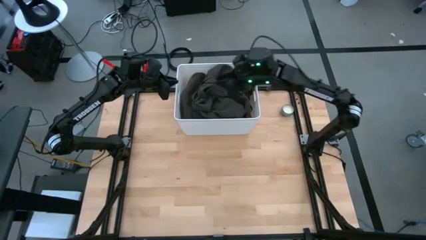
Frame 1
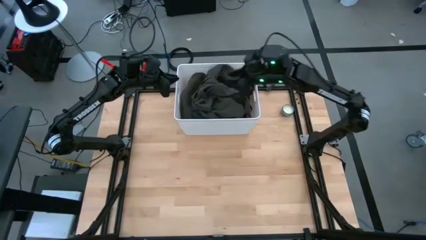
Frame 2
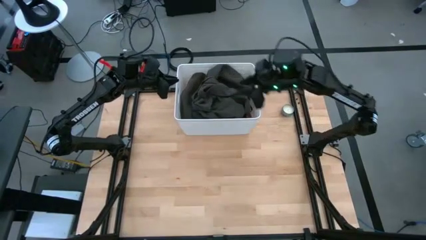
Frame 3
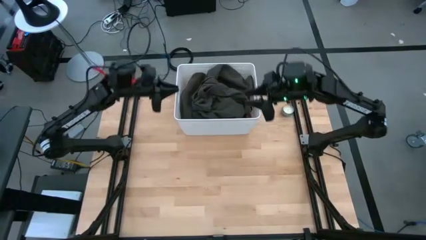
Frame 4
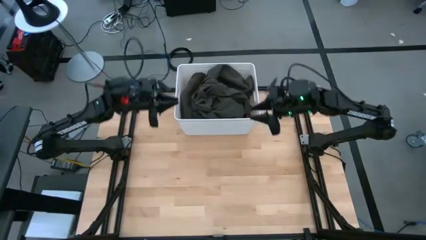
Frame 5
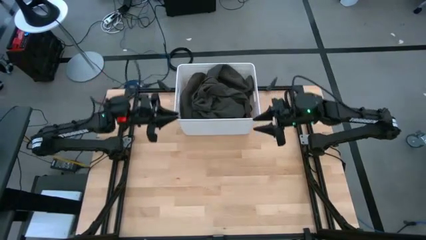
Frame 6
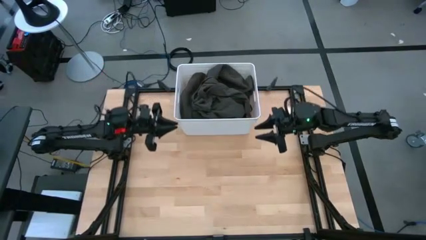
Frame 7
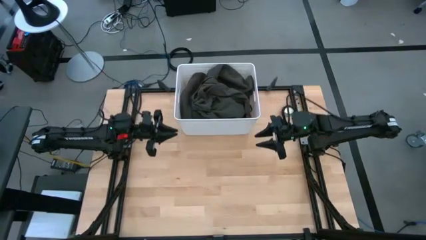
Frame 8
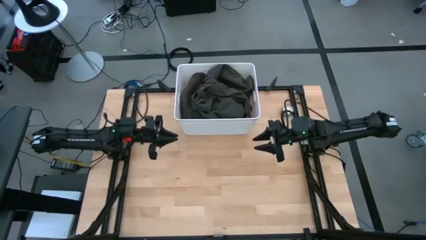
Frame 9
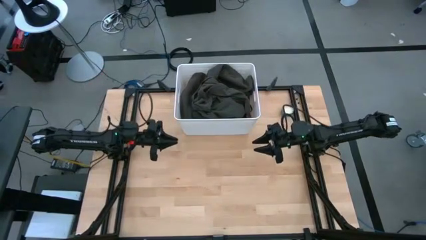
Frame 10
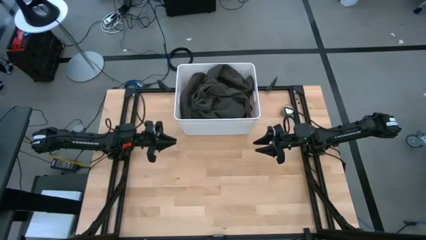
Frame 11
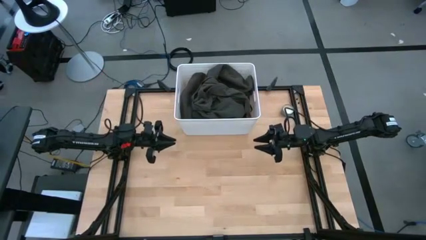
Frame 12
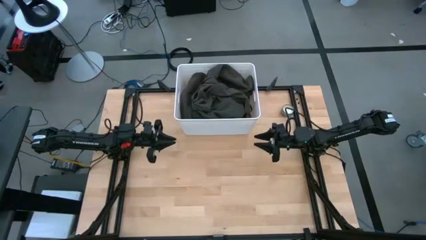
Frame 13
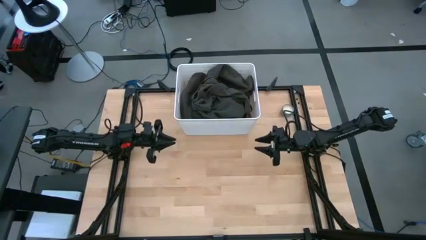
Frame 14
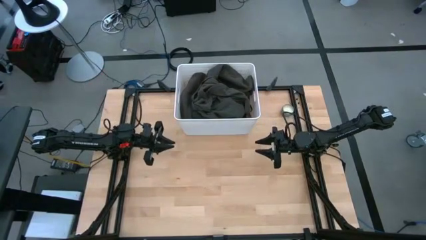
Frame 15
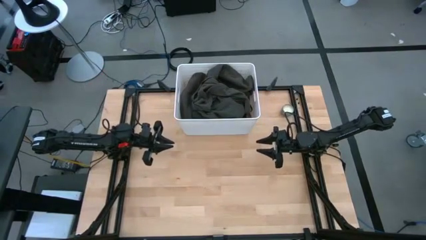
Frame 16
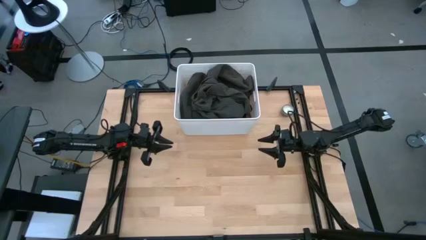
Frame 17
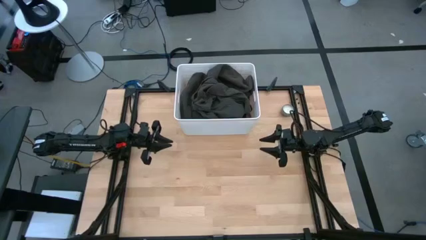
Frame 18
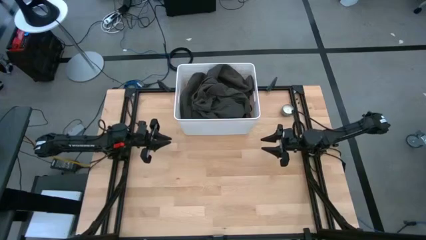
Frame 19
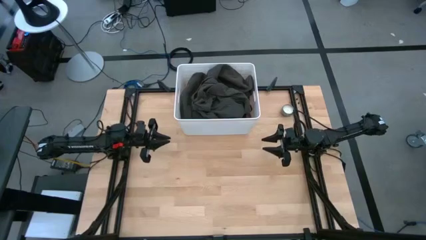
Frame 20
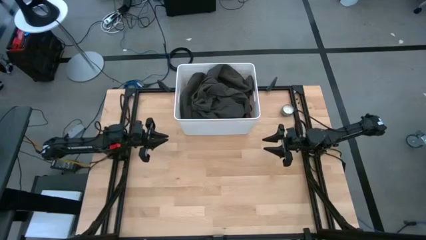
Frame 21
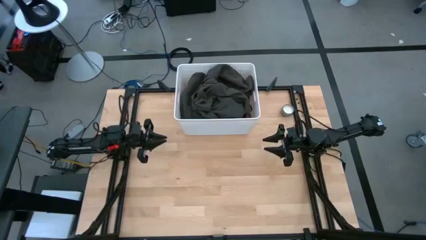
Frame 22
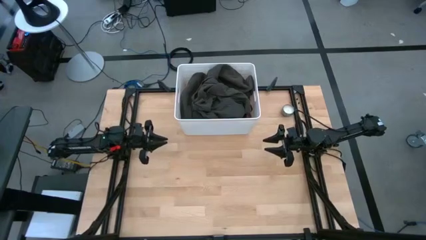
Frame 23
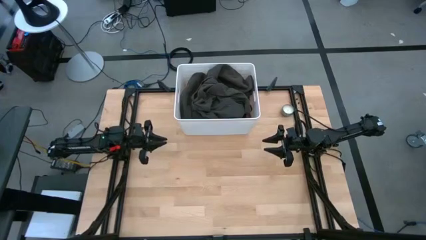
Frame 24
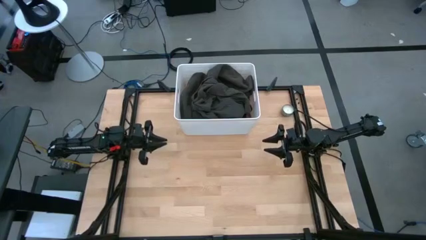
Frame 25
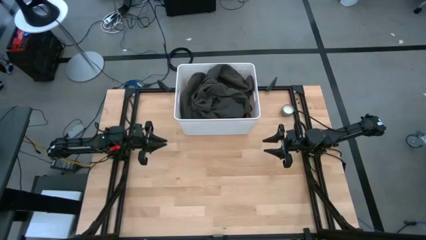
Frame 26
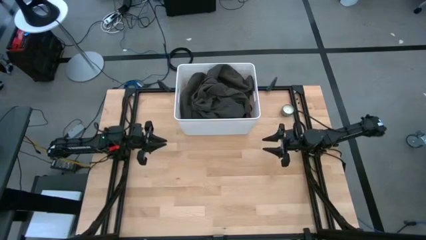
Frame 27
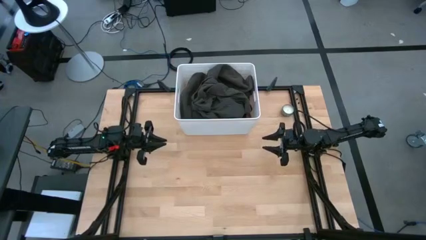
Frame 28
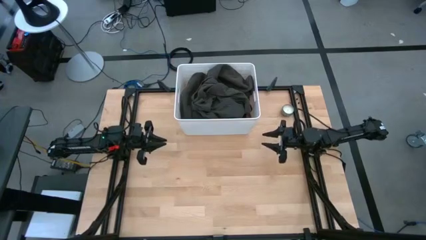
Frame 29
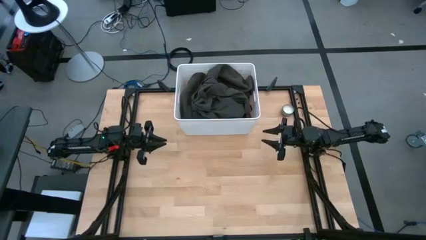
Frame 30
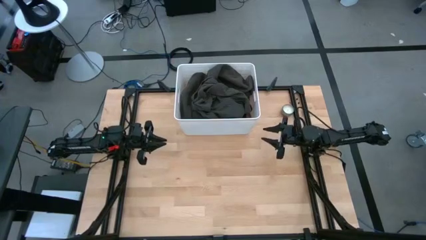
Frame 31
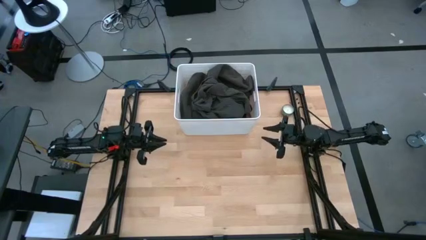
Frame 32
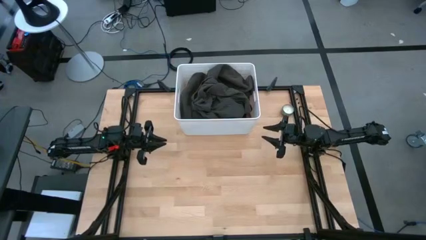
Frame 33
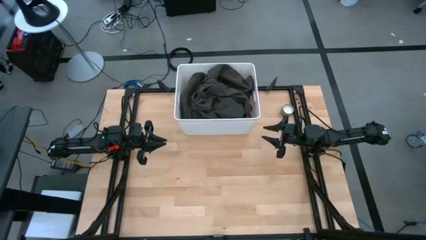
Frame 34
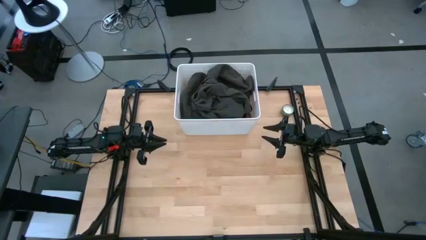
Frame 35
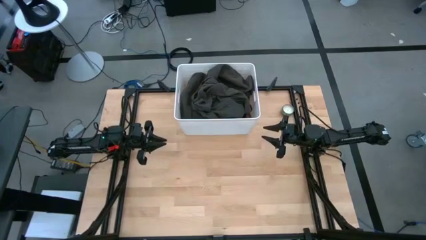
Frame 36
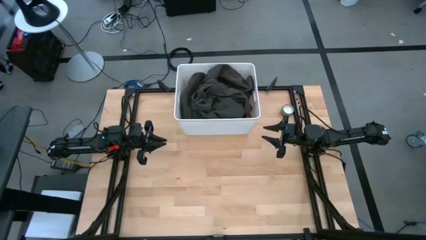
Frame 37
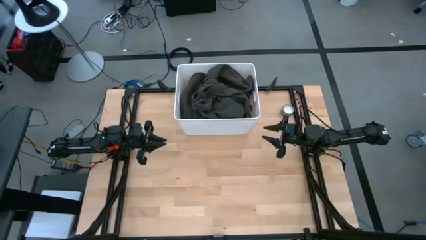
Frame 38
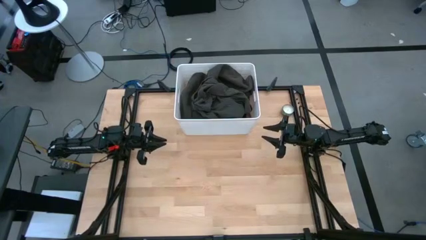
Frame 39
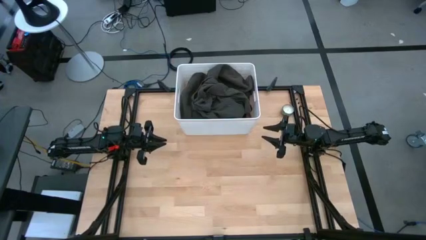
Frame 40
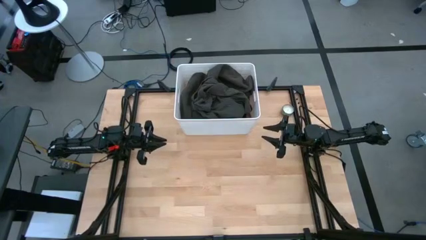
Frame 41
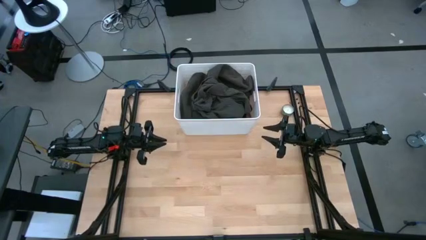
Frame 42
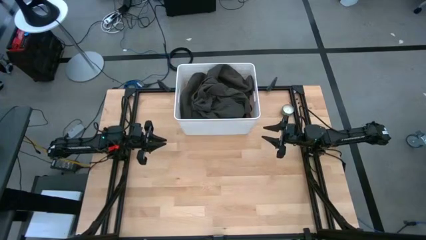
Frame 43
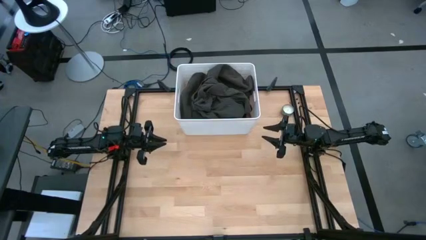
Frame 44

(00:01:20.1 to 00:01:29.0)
Task: Sort clothes
Return to Home Position

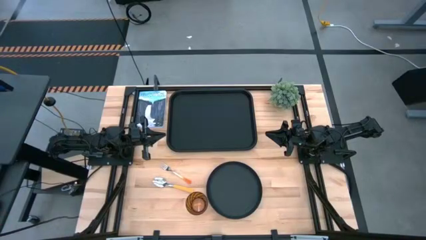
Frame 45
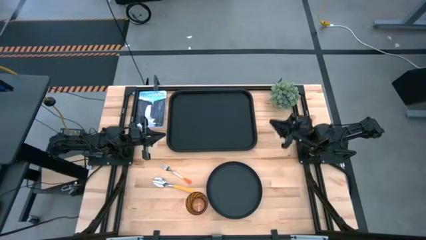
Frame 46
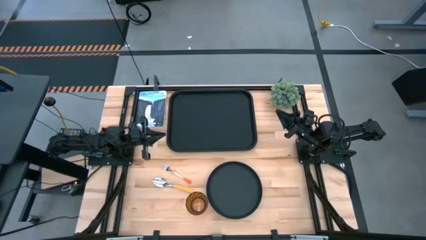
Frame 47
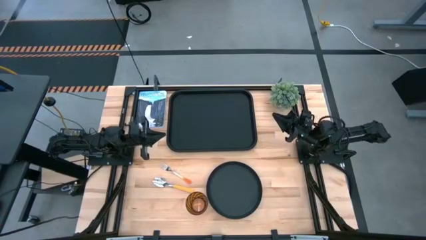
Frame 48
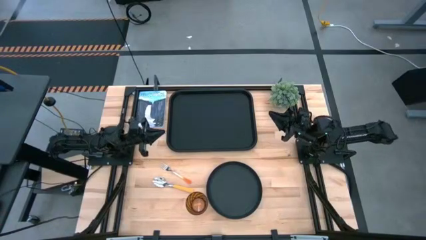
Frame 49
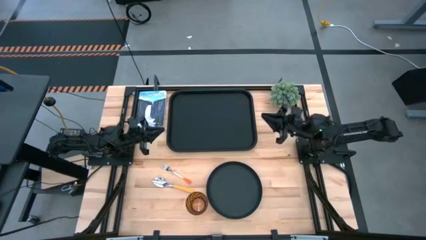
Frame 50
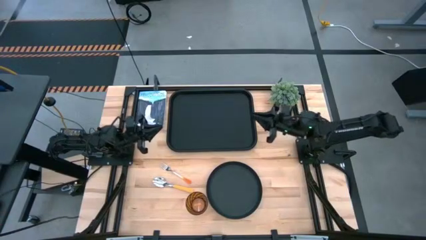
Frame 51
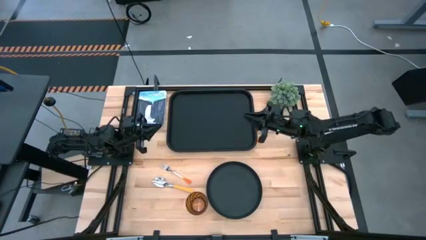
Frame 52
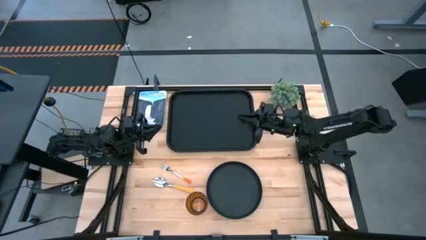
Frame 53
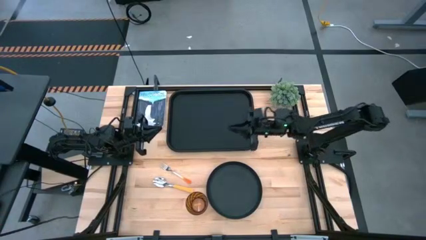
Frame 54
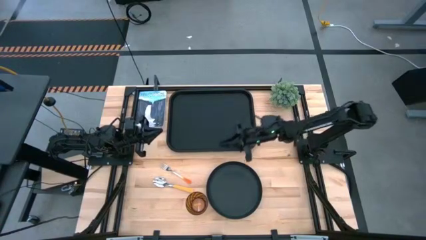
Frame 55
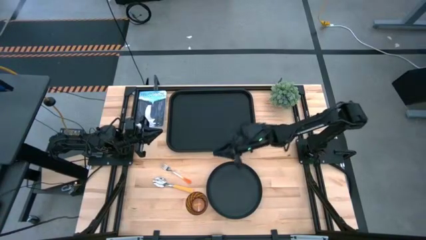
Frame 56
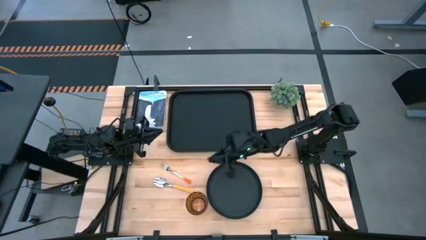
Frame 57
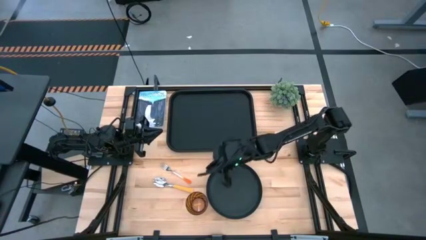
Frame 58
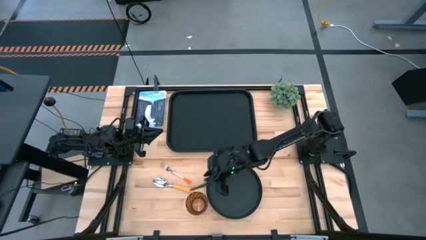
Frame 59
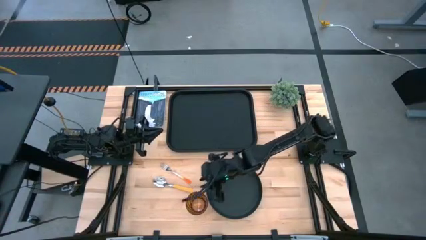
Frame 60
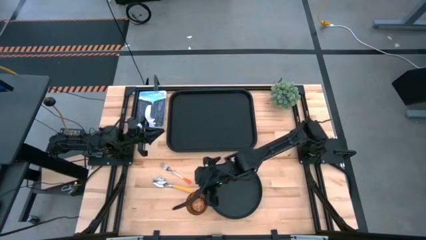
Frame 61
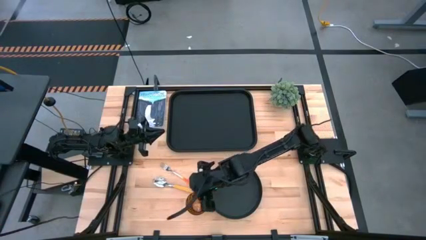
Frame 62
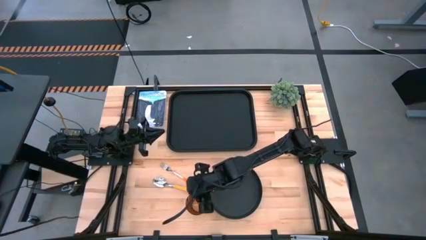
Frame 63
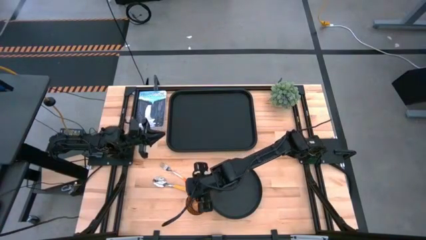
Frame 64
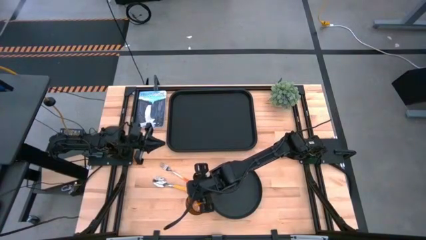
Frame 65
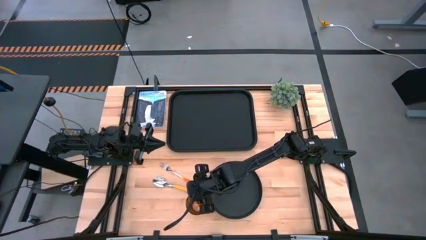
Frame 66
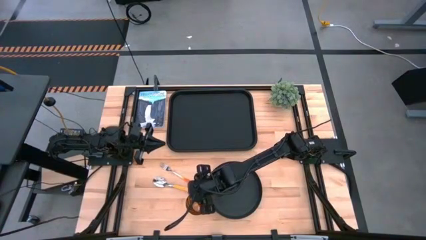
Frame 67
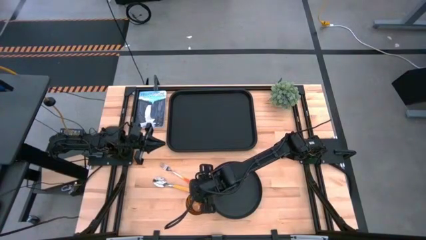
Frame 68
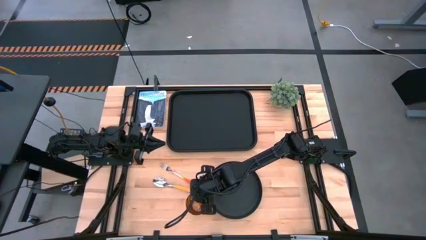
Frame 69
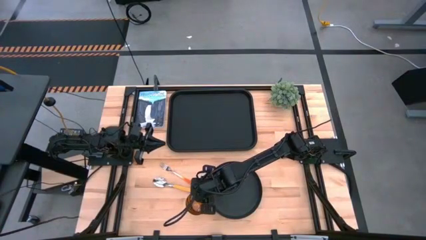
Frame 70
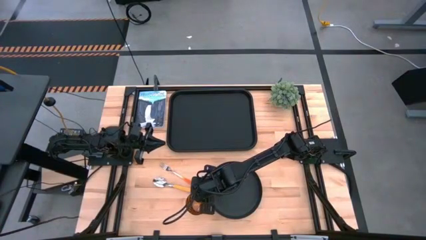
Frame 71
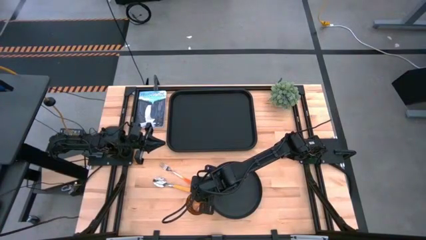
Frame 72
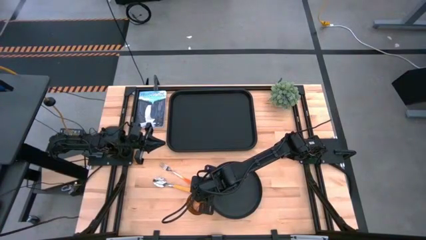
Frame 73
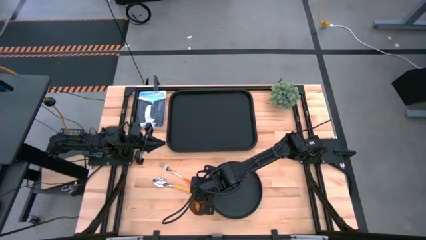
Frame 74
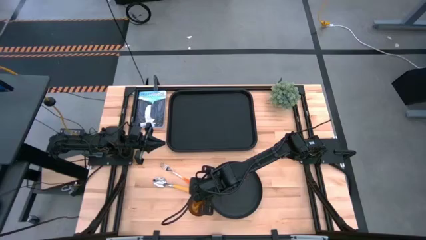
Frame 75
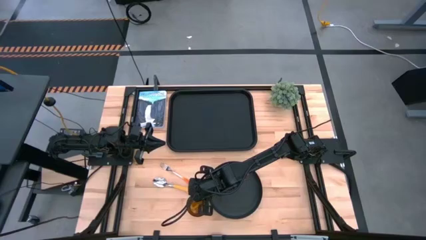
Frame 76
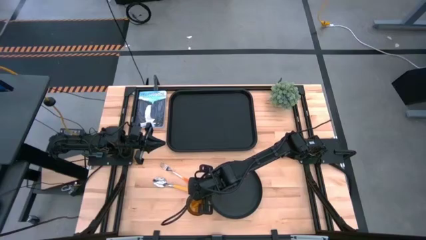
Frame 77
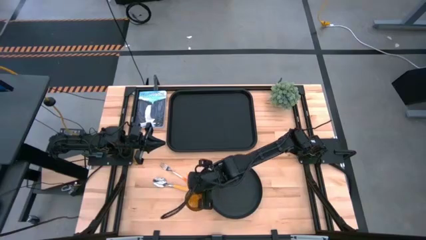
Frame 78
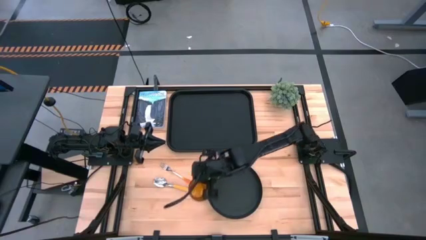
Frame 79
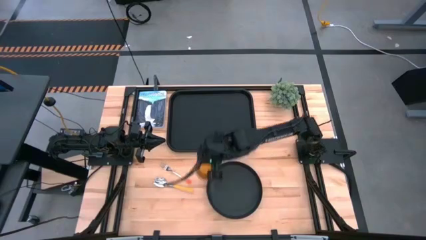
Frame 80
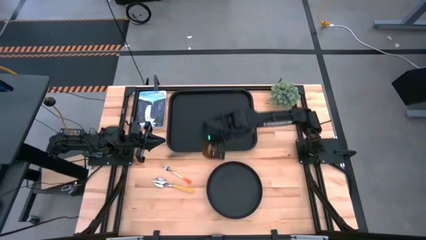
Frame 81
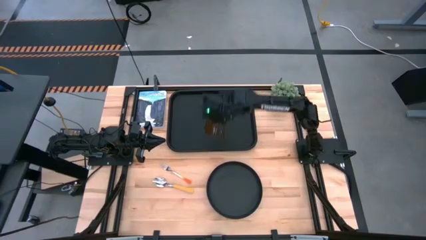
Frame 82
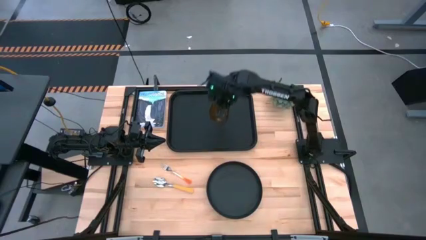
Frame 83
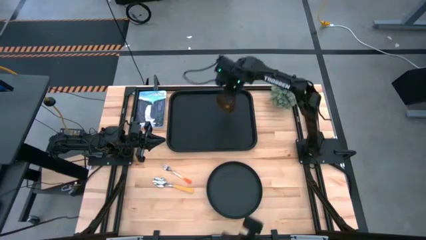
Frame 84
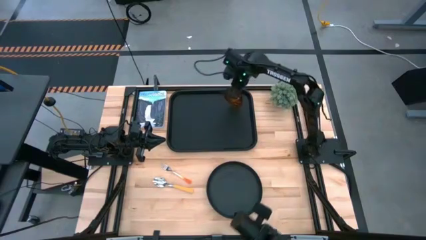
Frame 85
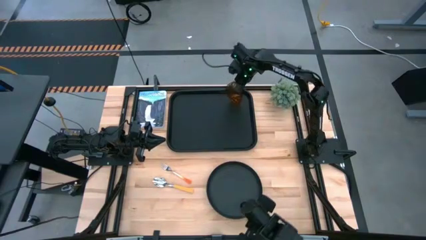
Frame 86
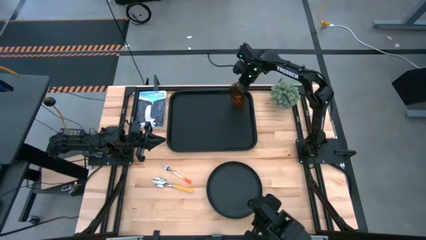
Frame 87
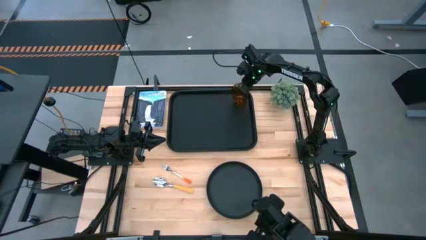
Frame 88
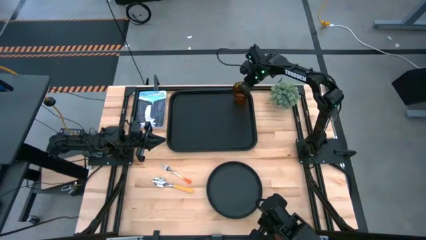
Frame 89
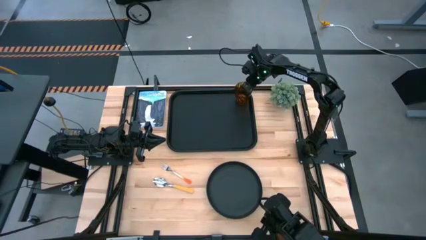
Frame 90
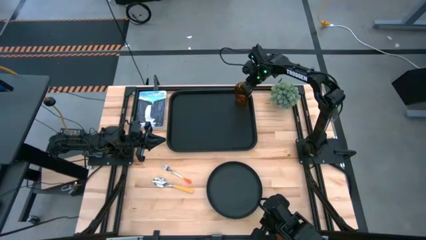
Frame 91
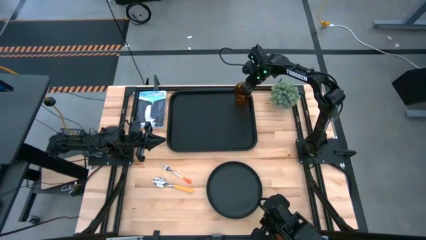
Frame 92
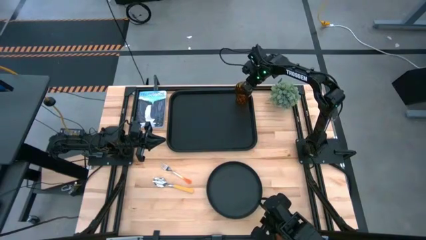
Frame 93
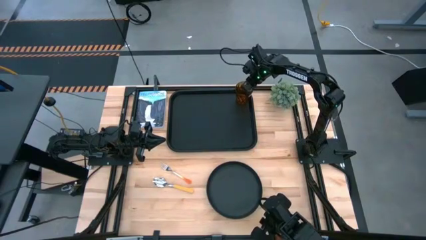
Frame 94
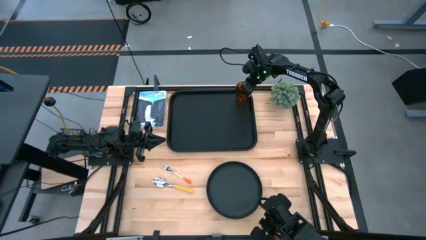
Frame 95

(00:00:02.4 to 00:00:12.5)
Task: Pick and place plate/cup/fork/spoon on tray
Put the brown cup on the top right corner of the black tray
